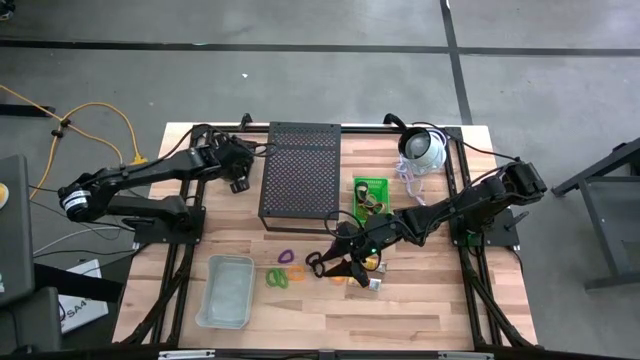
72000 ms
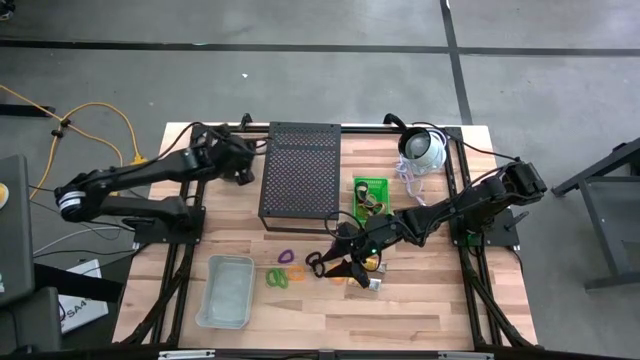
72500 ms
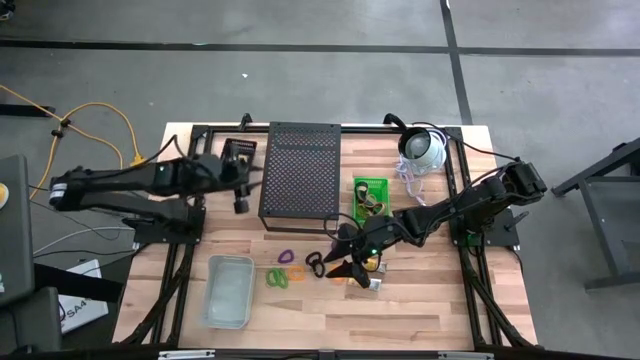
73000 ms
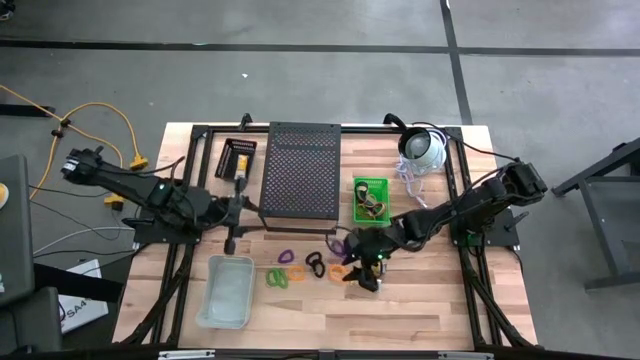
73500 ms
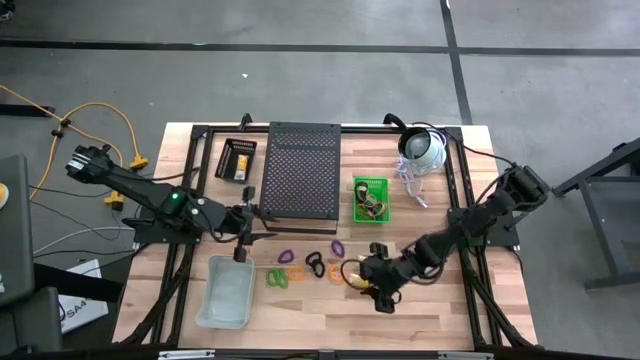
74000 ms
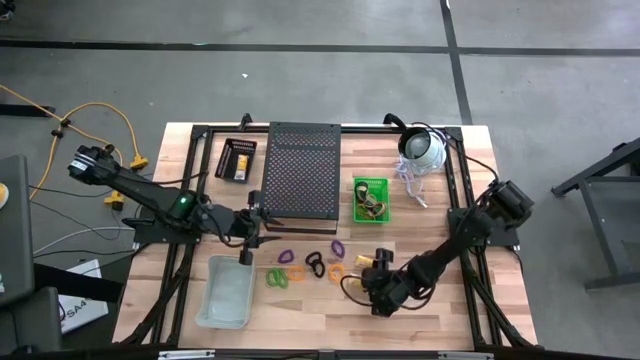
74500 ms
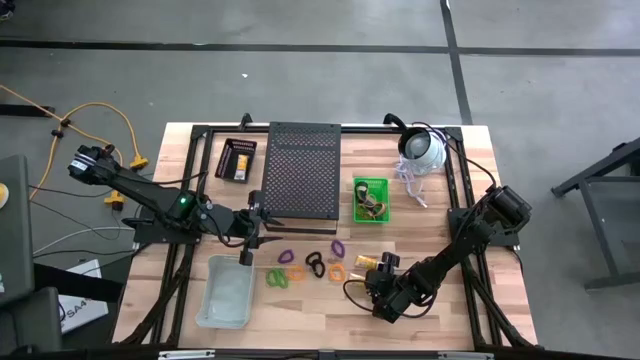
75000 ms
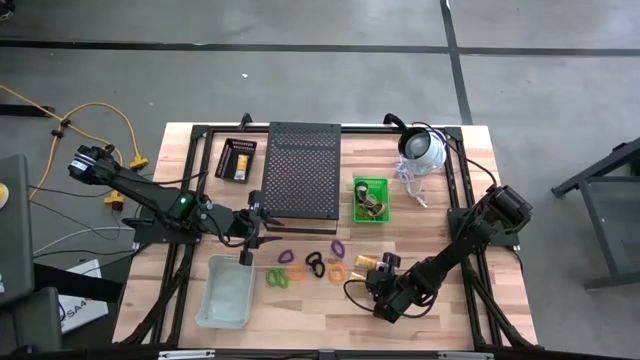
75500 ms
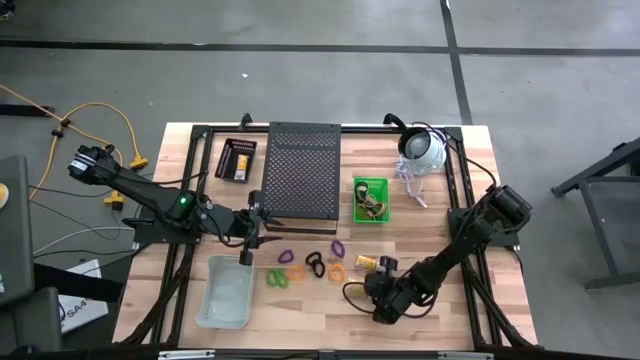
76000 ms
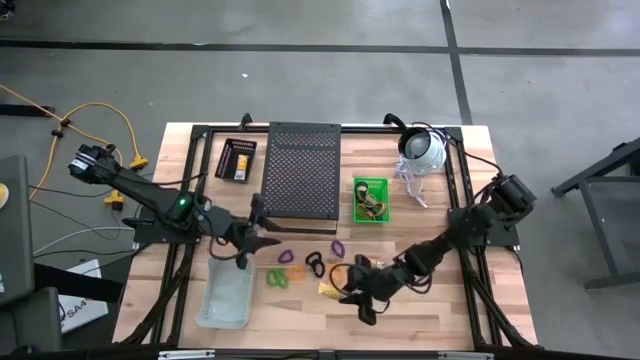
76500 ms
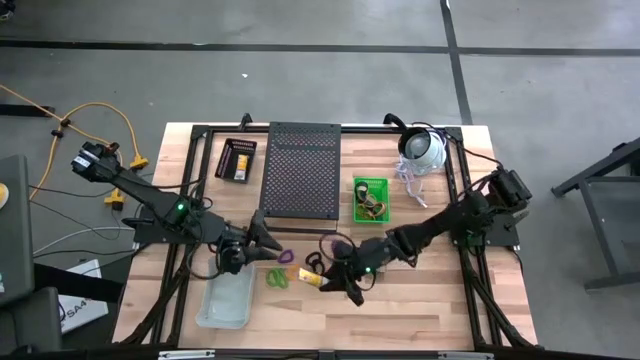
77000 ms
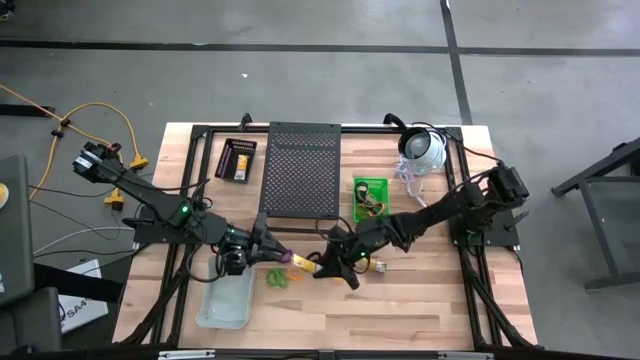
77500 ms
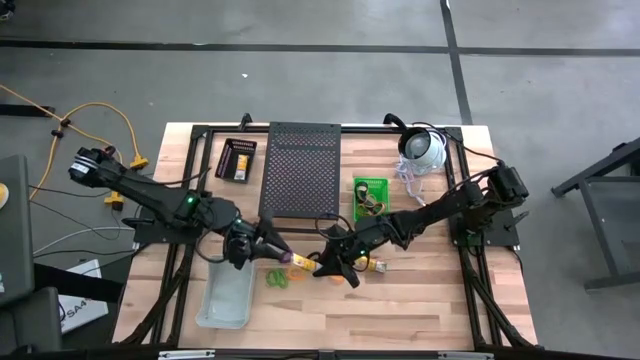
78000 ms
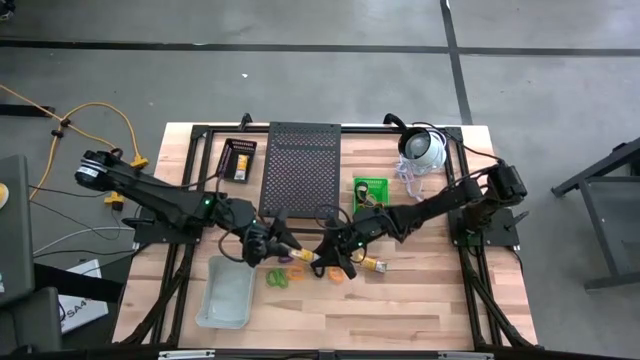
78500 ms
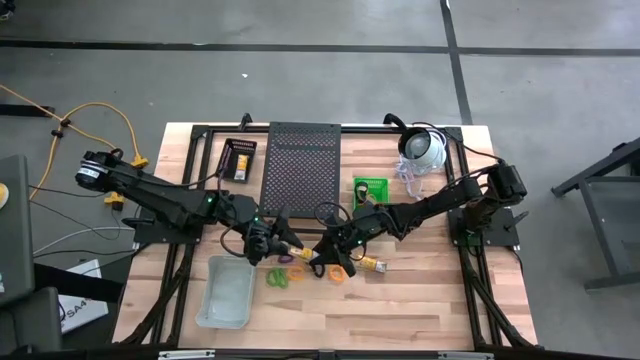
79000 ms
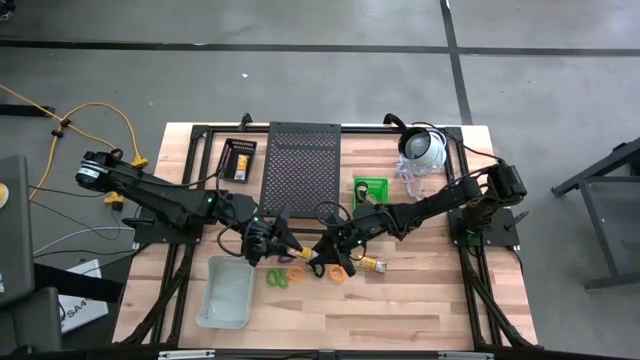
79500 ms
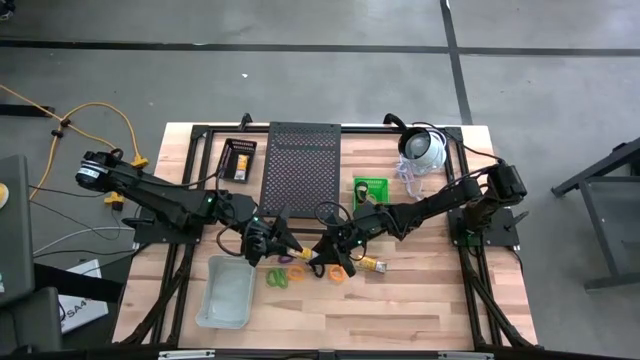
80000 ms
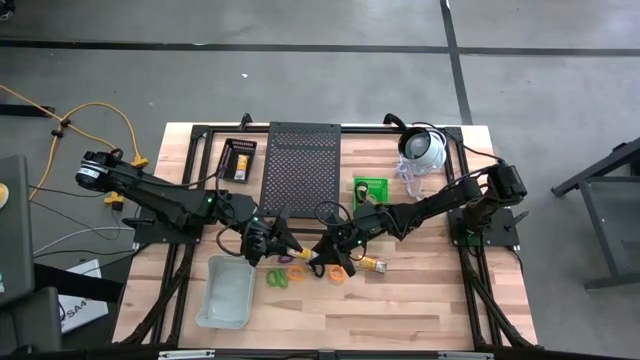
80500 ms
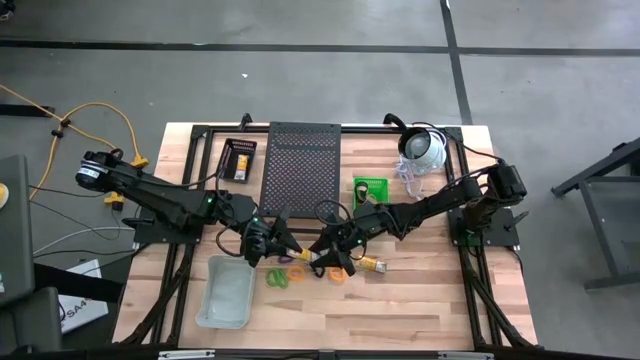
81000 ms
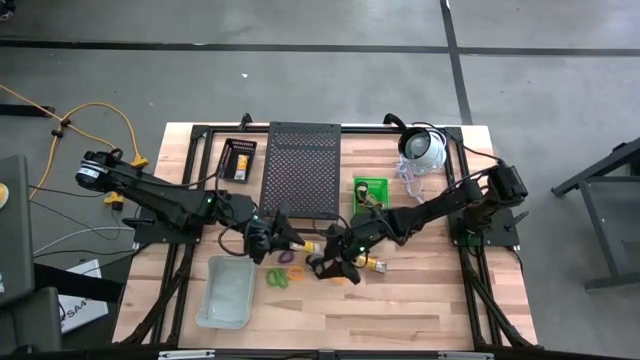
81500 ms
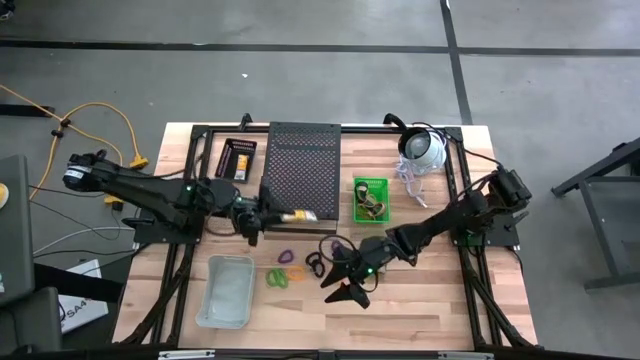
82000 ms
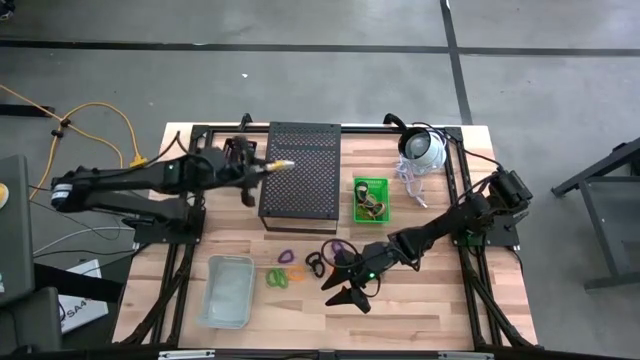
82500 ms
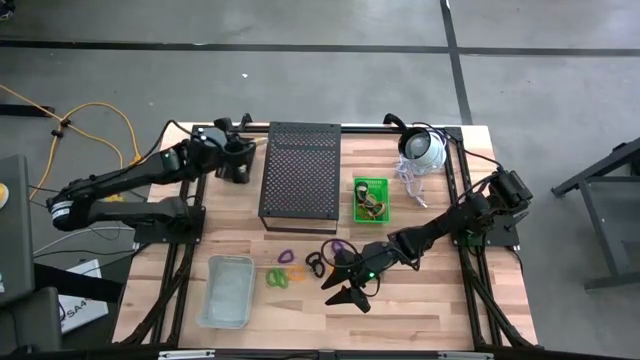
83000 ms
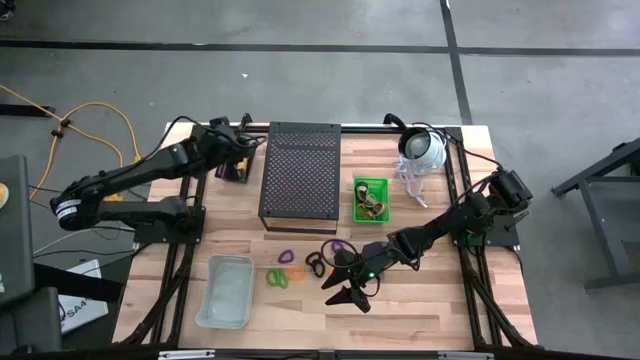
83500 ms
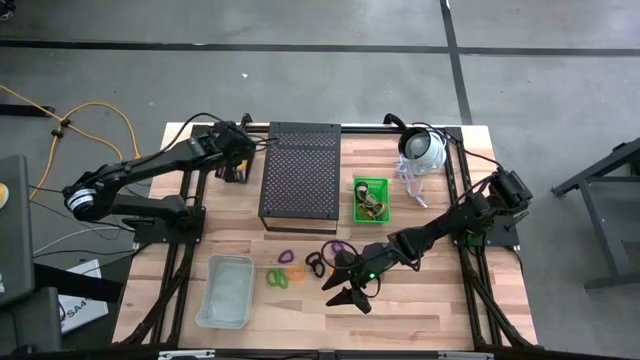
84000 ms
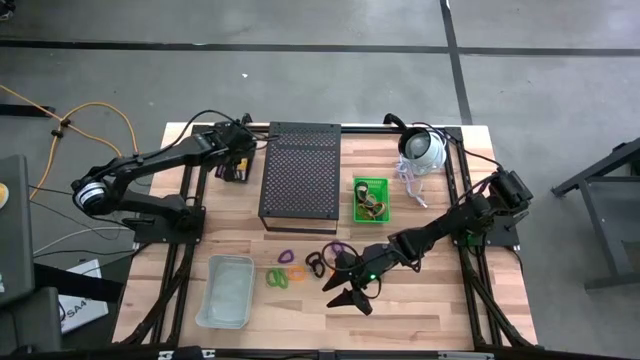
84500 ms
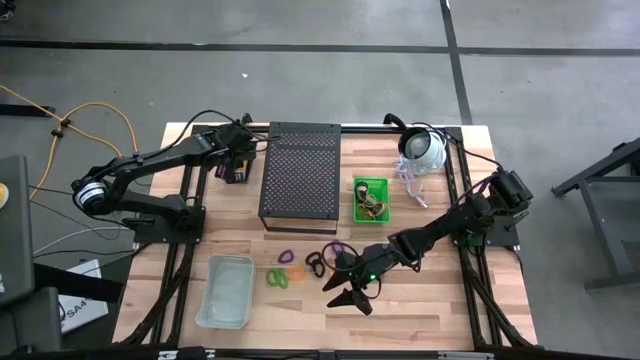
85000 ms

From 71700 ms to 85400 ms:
Task: Pick & Place Office Desk Supplies
Put the bottom crayon box into the black basket

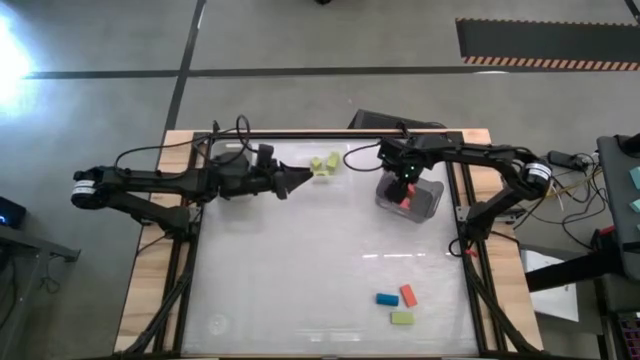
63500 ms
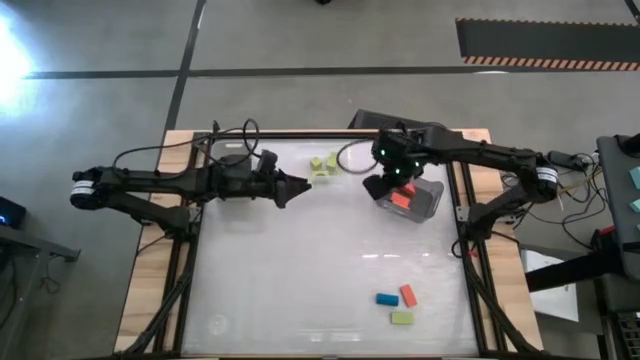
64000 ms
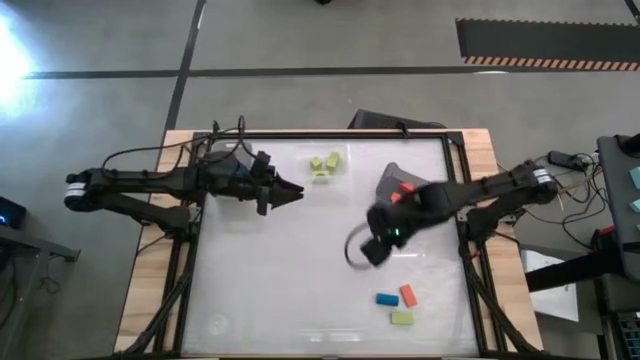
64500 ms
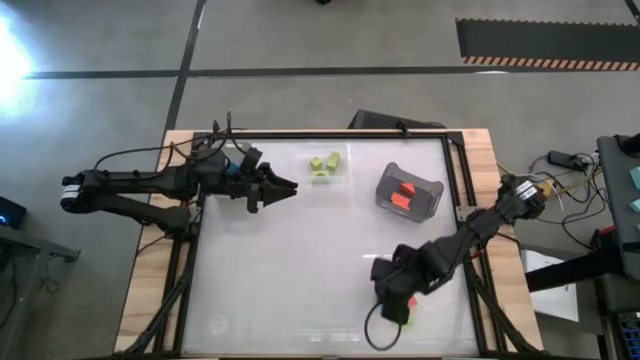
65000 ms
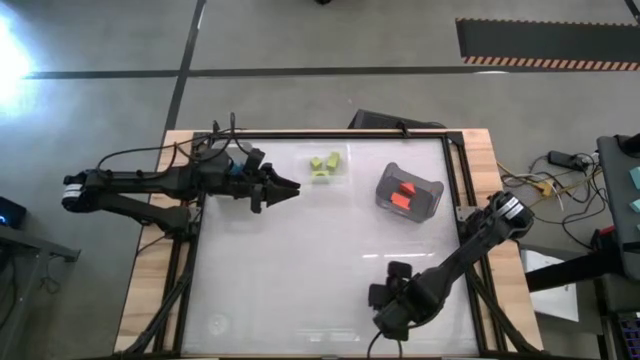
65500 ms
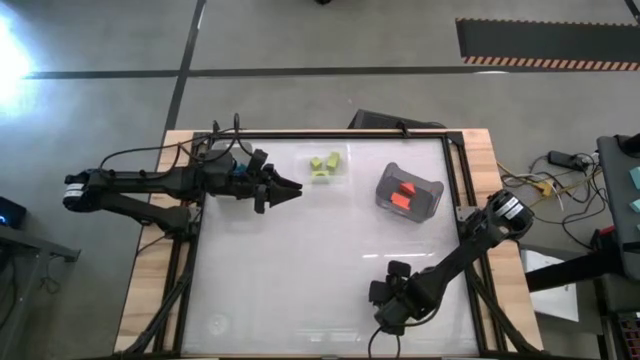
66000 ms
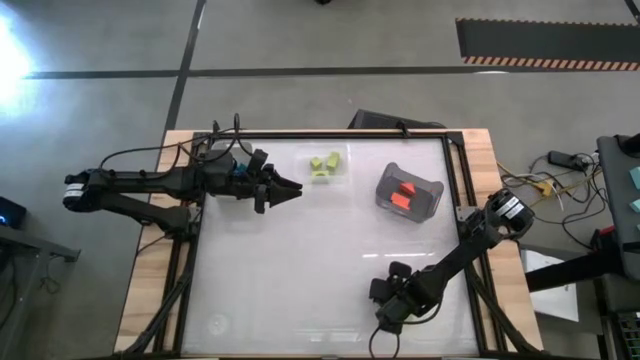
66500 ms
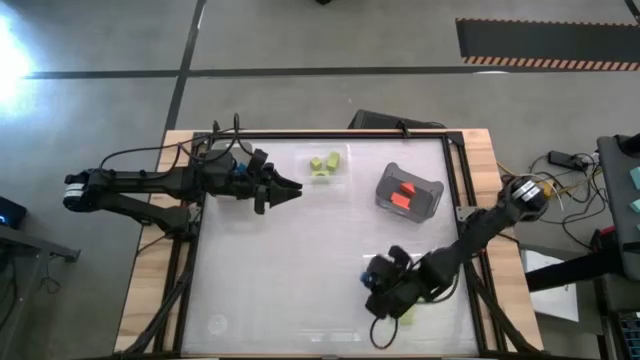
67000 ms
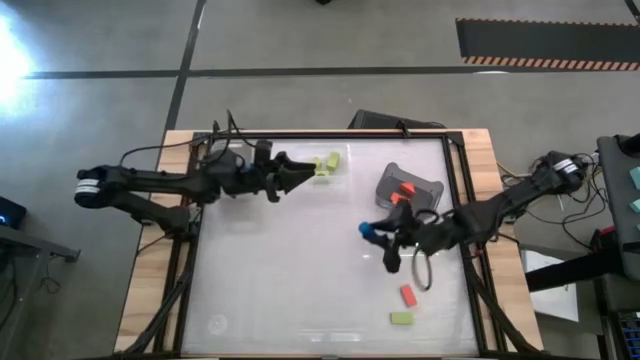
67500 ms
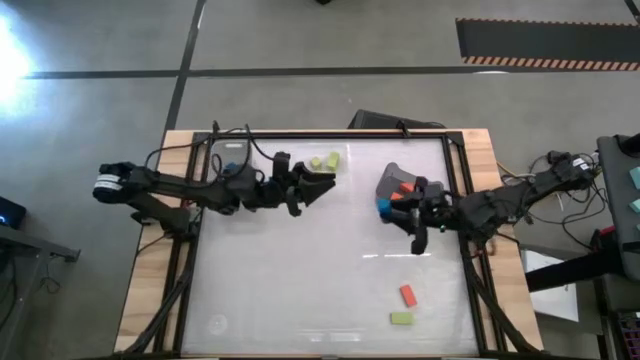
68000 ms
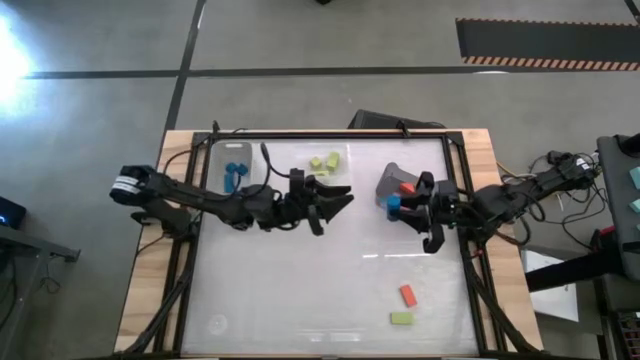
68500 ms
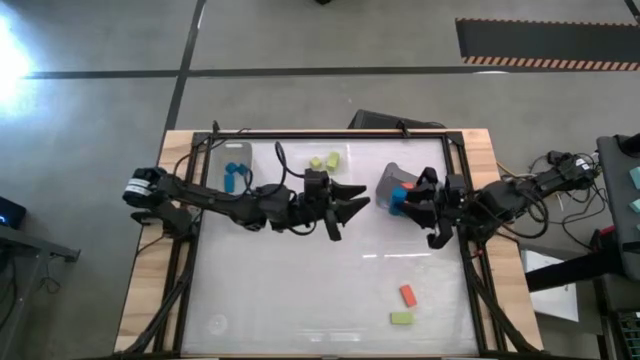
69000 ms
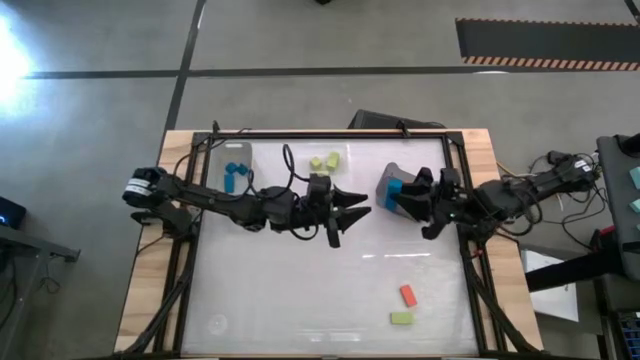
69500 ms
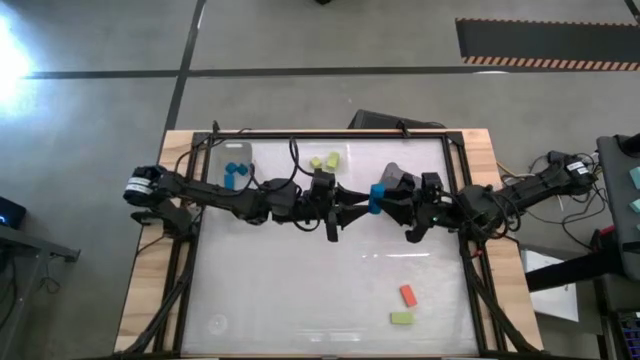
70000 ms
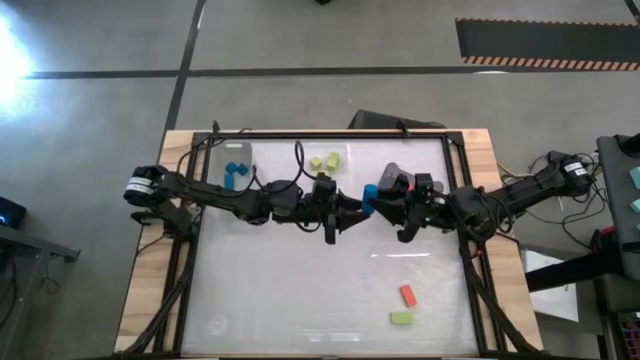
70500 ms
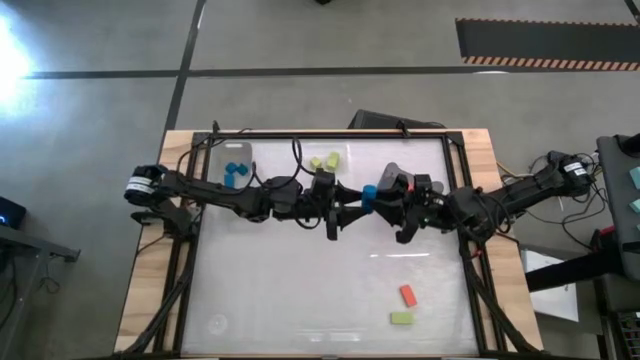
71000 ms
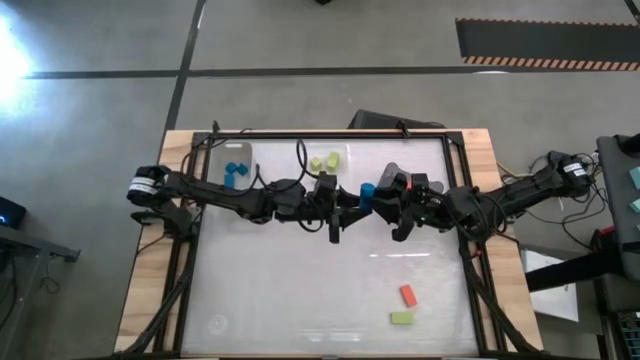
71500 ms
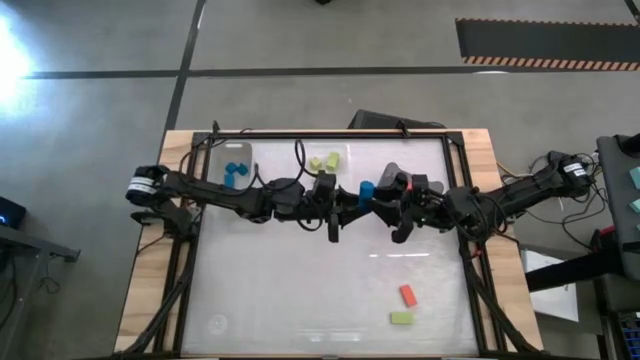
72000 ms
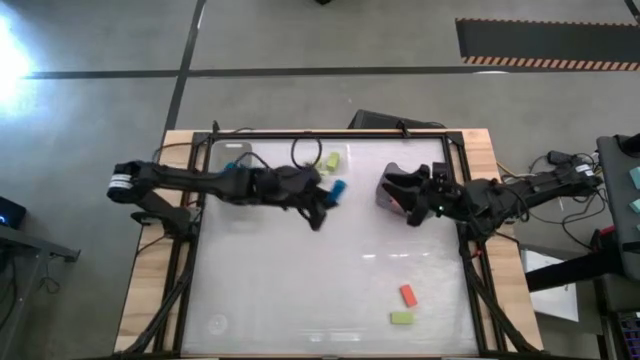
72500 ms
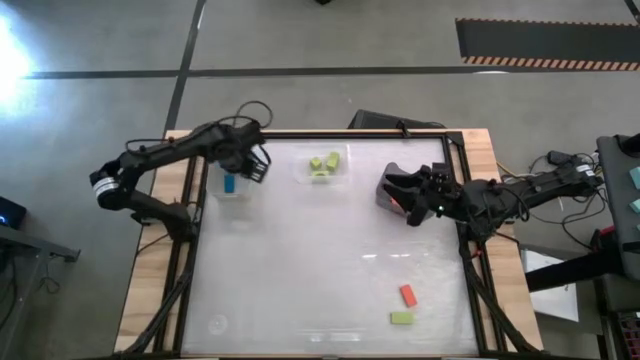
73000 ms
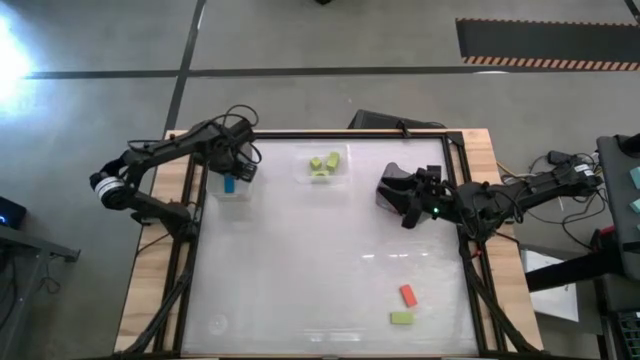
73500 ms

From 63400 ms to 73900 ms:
Task: Sort & place blocks by color
Put the blue block into the gray bin
